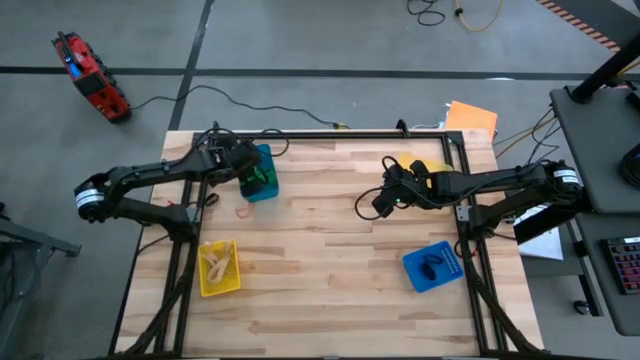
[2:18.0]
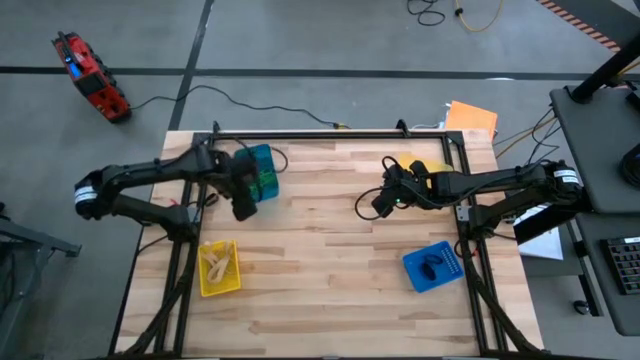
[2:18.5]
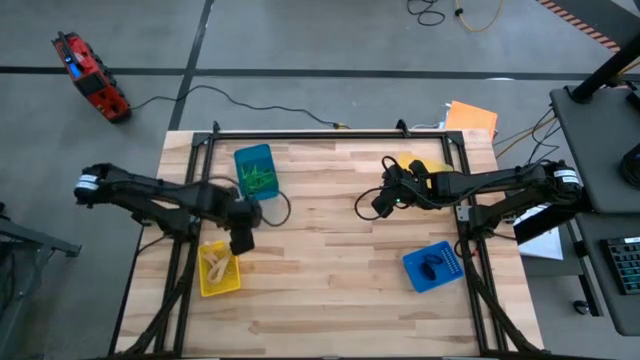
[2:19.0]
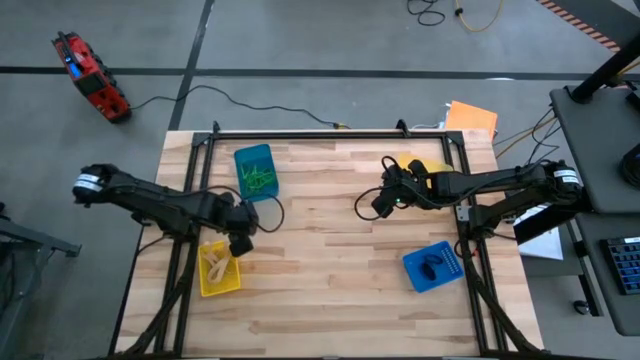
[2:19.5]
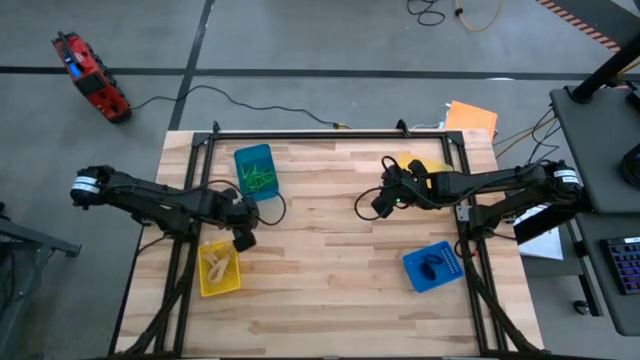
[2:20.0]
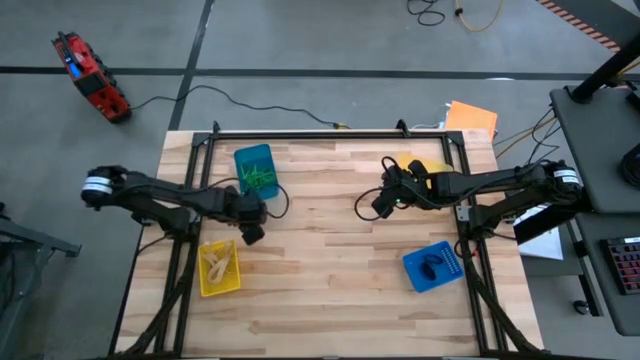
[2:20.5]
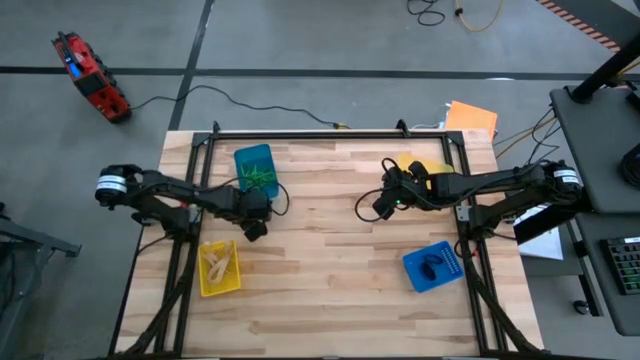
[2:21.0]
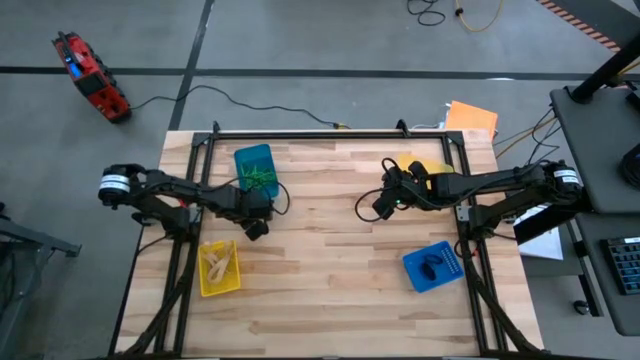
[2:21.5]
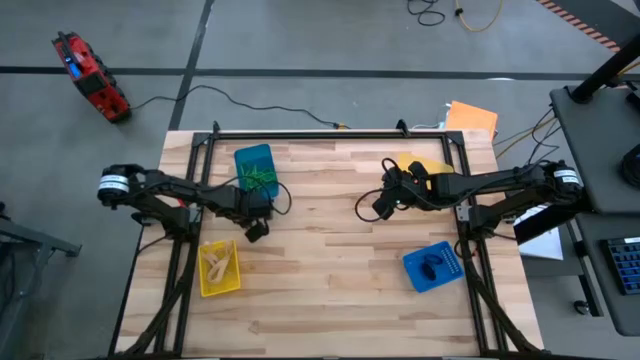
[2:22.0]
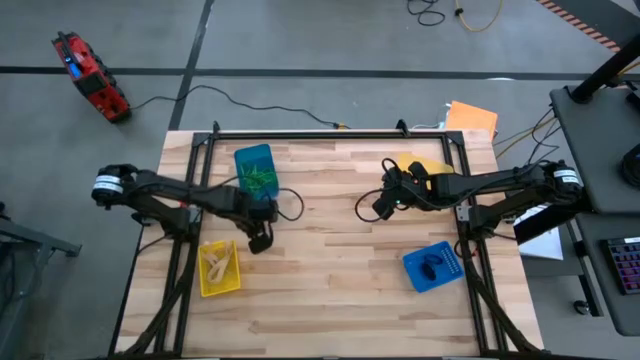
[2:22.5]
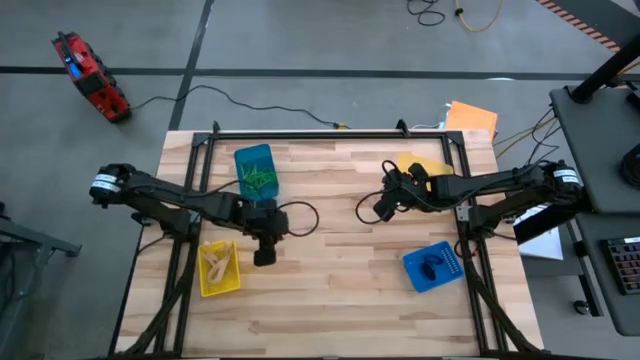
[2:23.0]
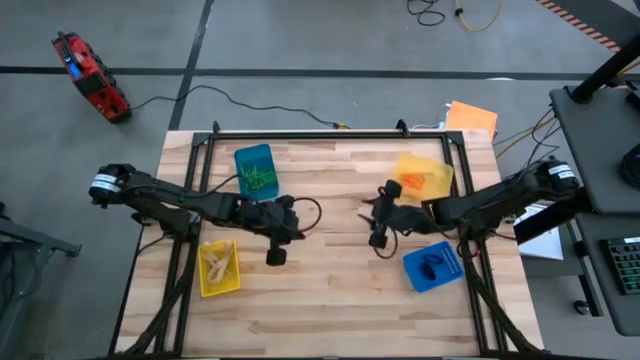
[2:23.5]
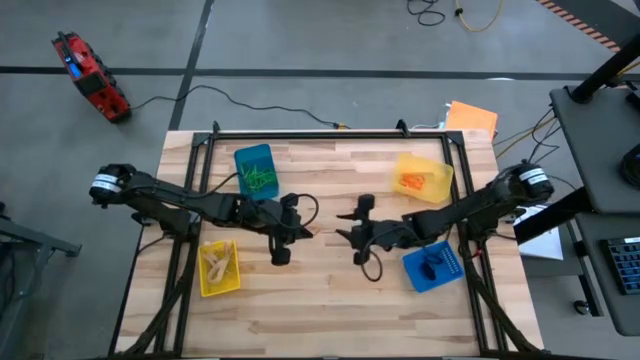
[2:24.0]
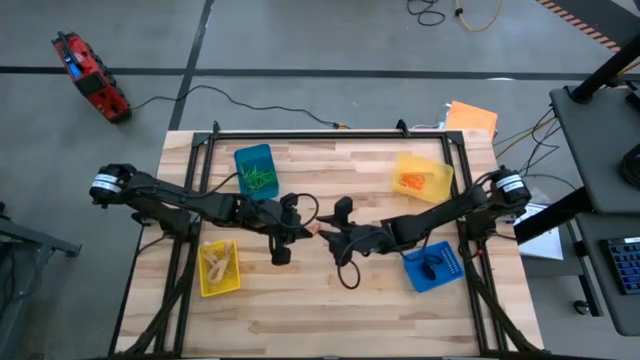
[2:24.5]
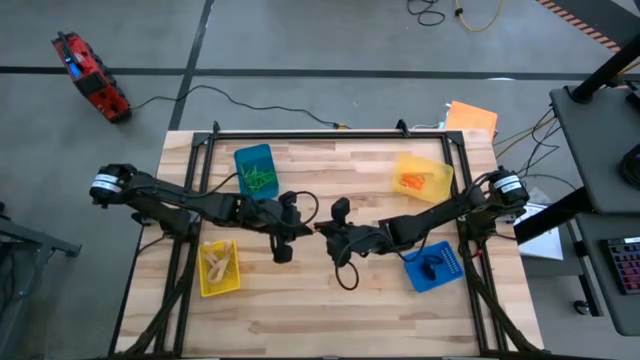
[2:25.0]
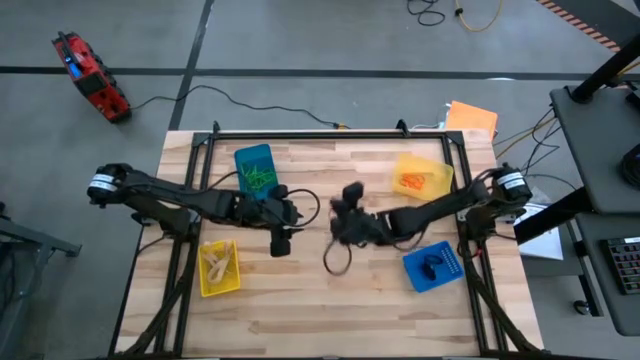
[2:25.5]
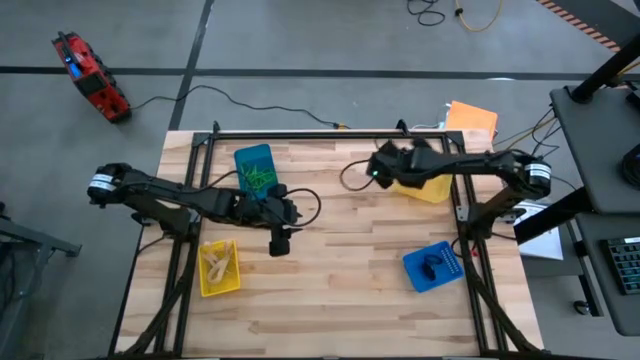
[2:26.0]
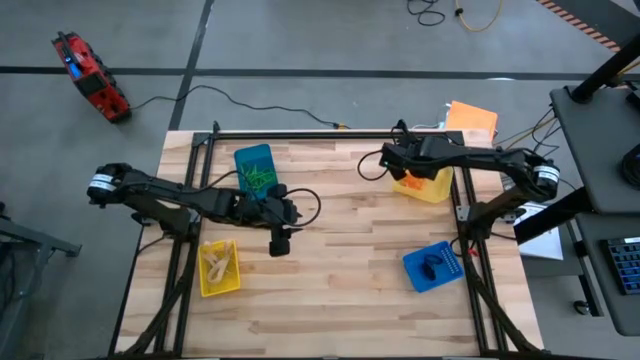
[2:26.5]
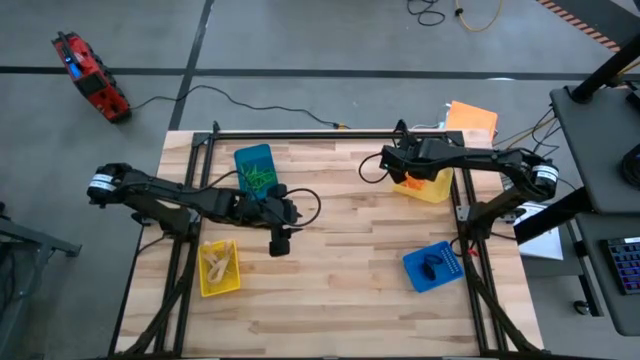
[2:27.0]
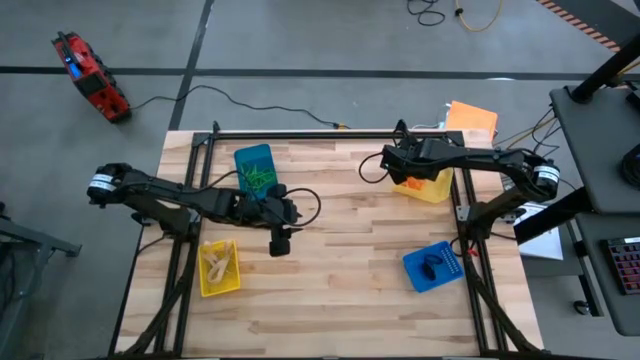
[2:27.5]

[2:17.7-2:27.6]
Task: Sort rubber bands into baskets
Put the orange rubber band into the light yellow bin

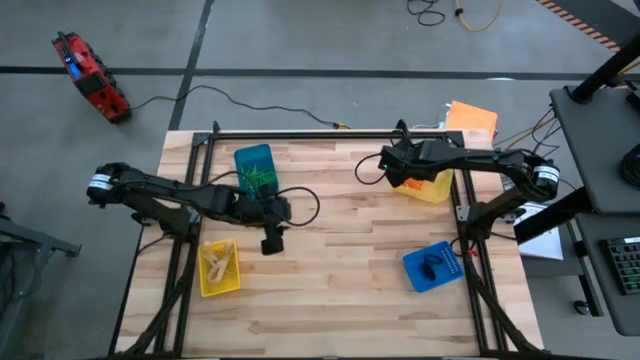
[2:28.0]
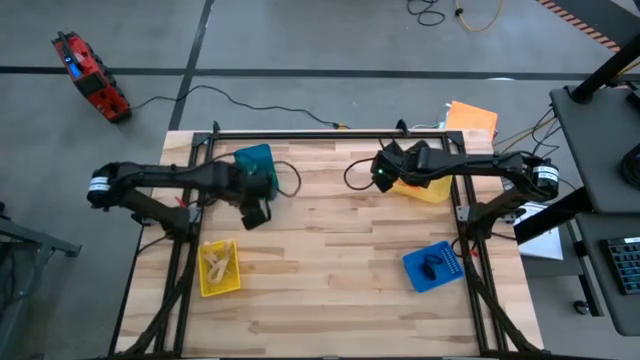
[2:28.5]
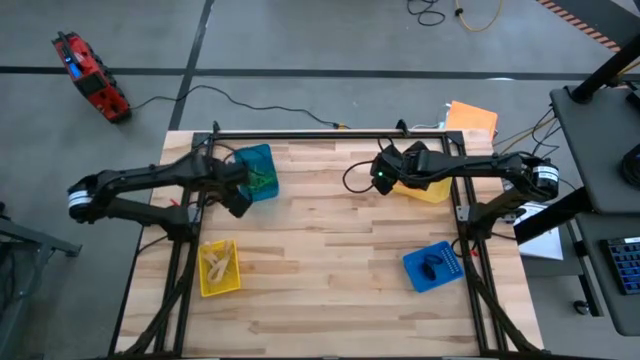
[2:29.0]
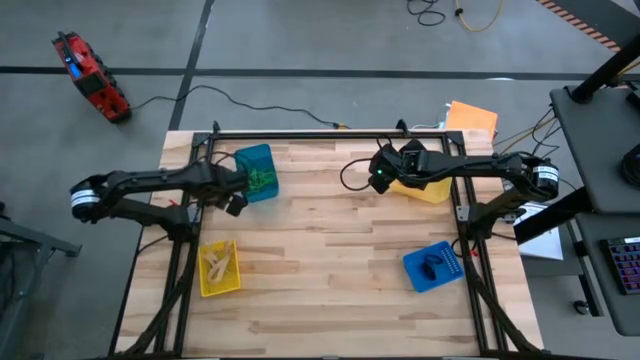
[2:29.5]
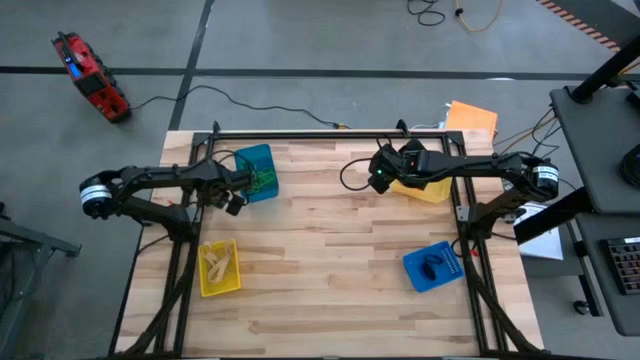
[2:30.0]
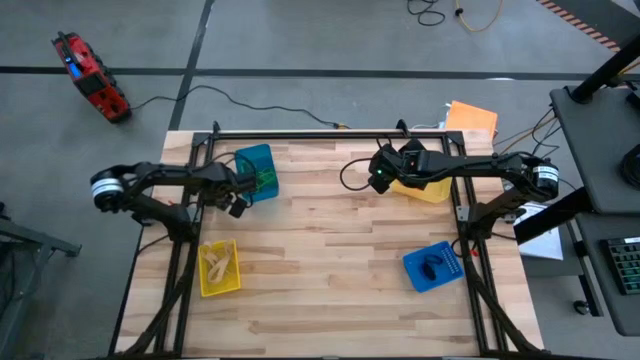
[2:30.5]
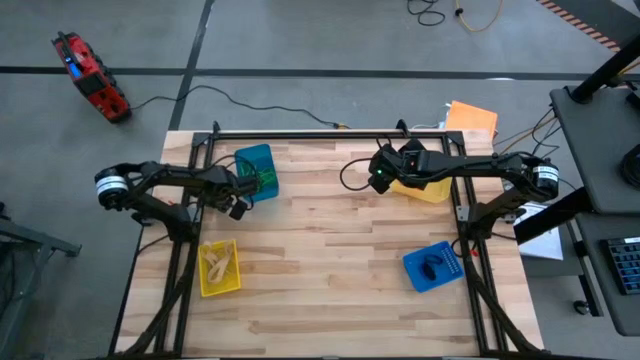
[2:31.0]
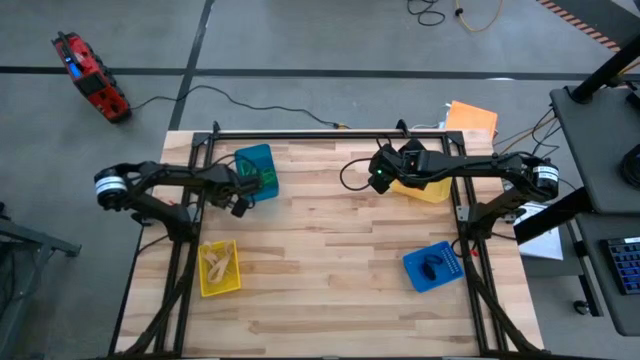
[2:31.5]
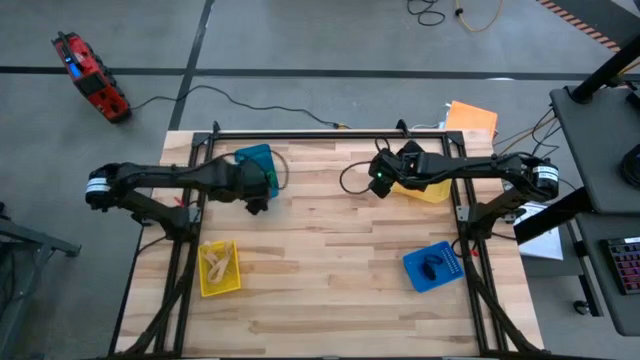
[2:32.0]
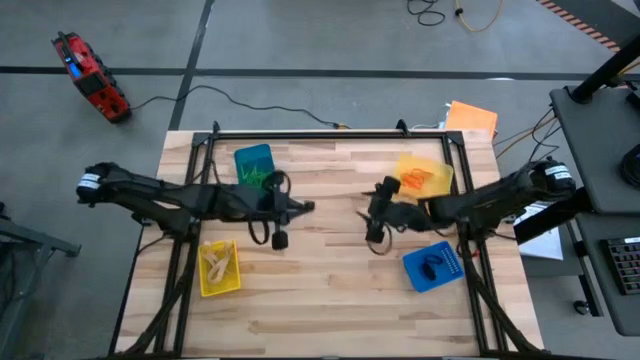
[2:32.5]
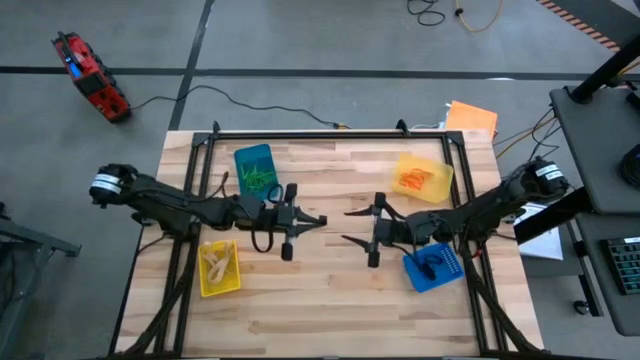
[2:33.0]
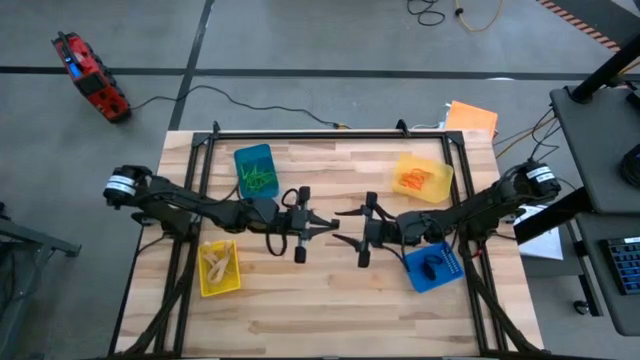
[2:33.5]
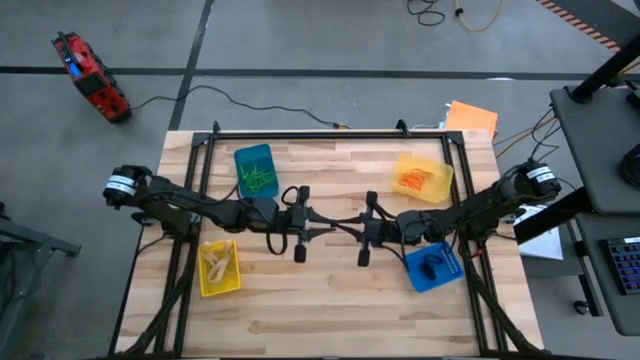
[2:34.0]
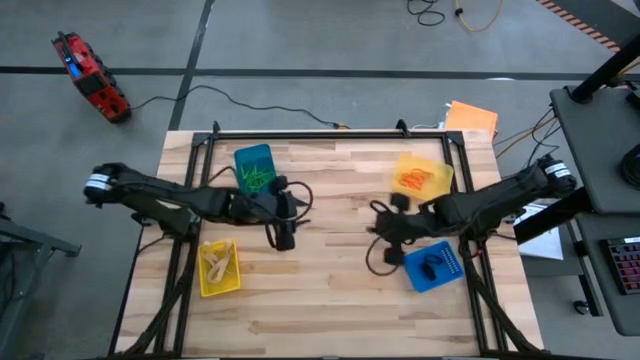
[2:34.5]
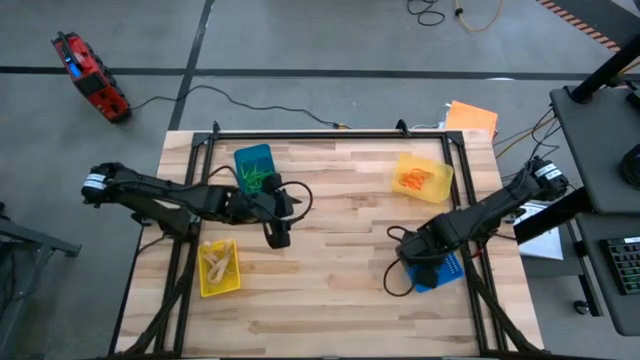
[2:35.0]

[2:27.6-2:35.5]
Put the black rubber band into the bottom blue bin

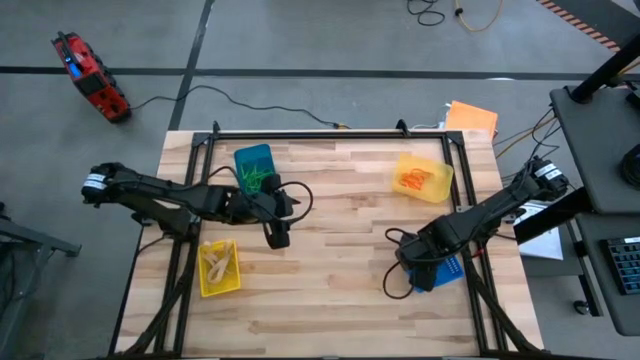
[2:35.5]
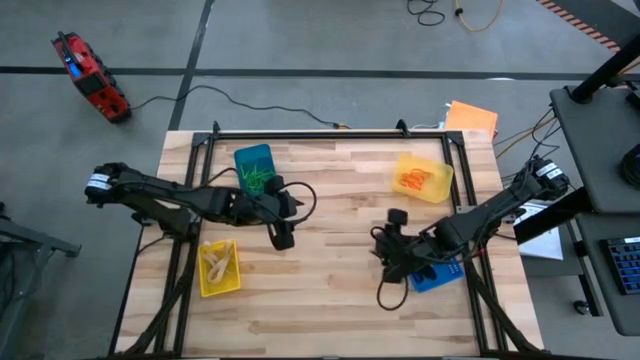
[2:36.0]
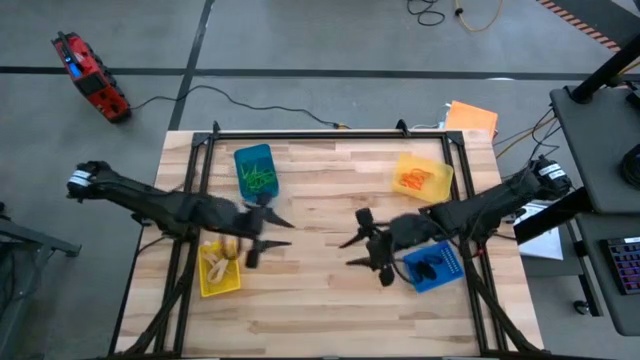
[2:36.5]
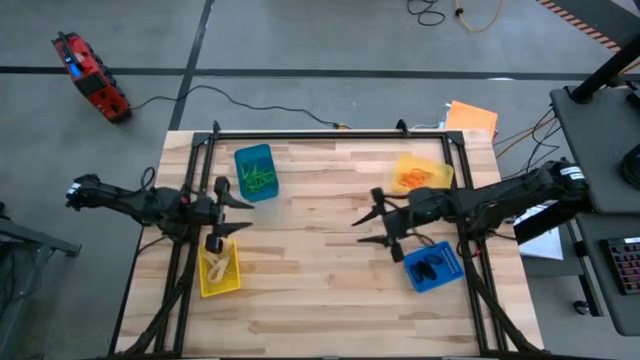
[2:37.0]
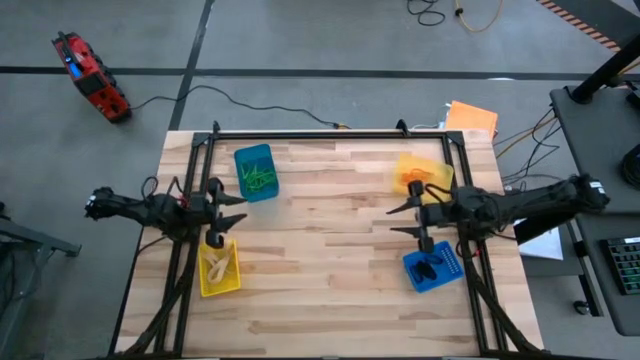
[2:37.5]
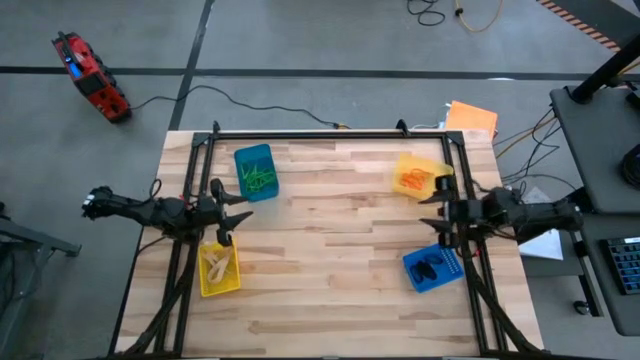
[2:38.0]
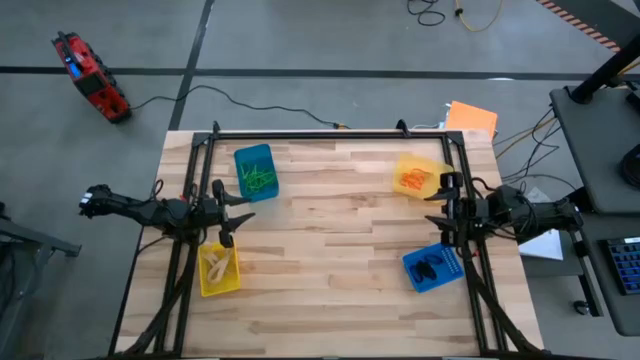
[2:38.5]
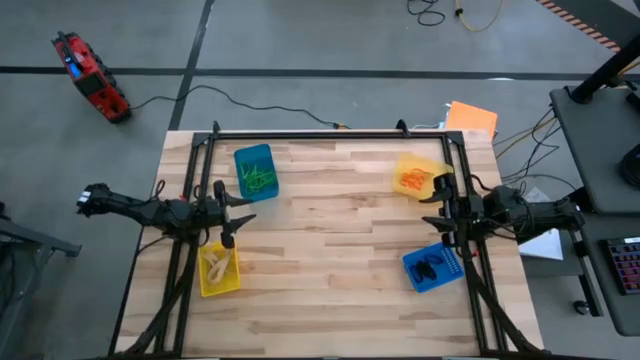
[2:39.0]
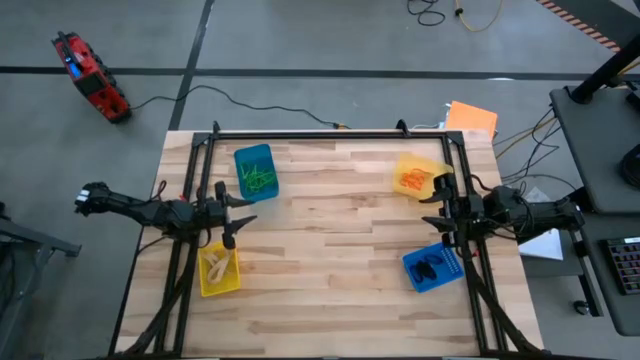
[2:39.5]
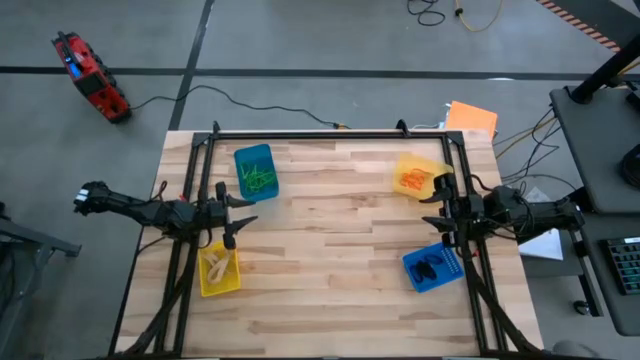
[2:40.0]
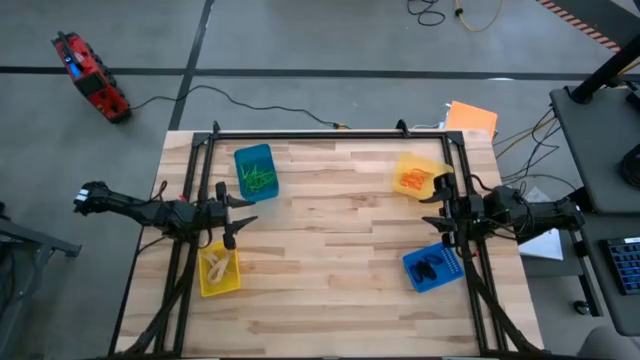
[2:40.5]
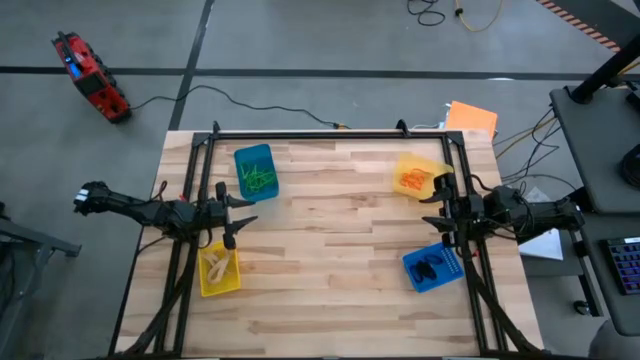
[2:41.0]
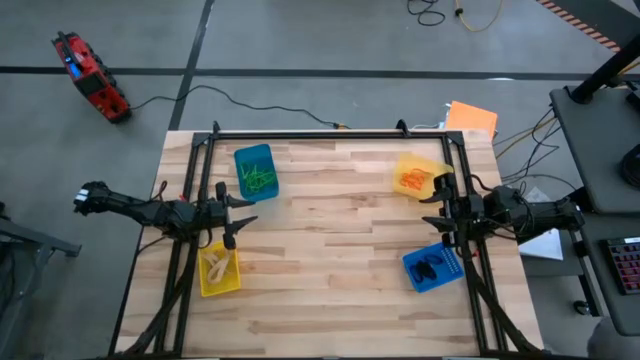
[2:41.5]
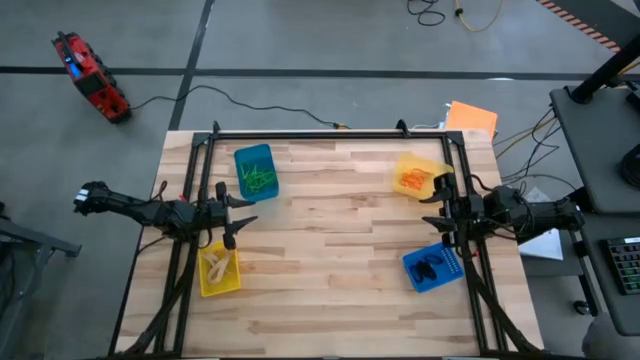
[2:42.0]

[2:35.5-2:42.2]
Return to Home Position
